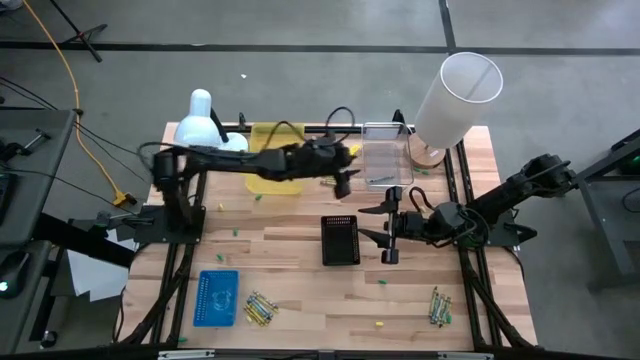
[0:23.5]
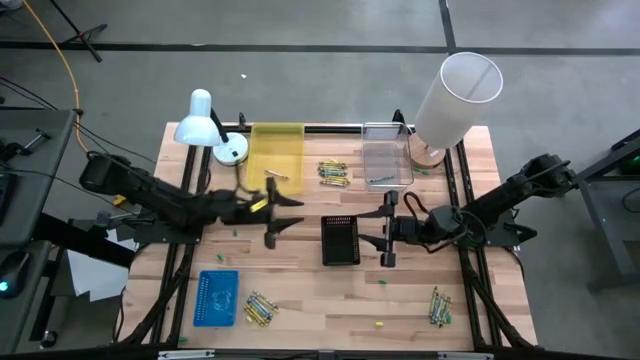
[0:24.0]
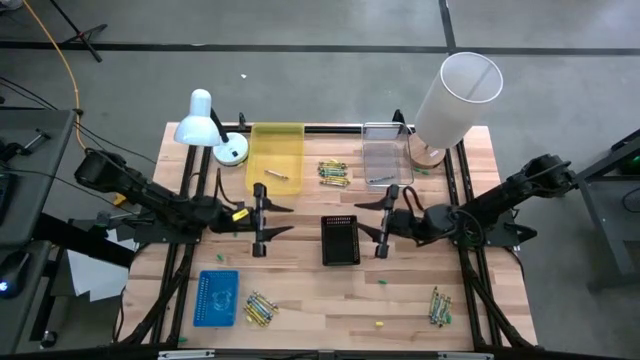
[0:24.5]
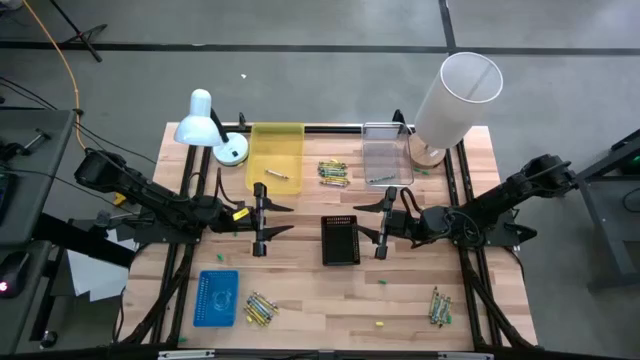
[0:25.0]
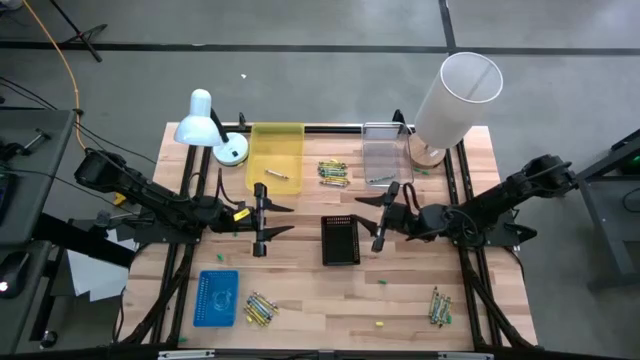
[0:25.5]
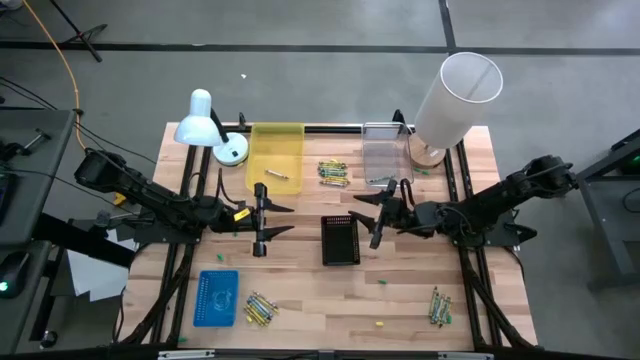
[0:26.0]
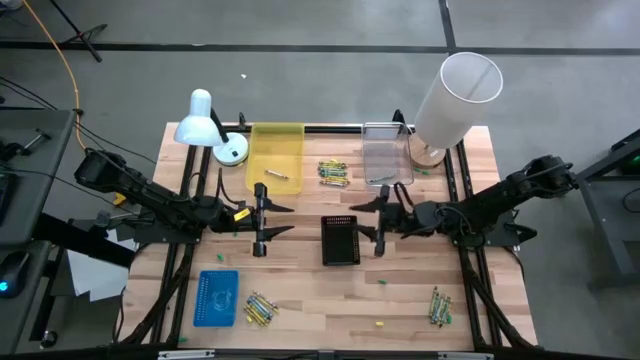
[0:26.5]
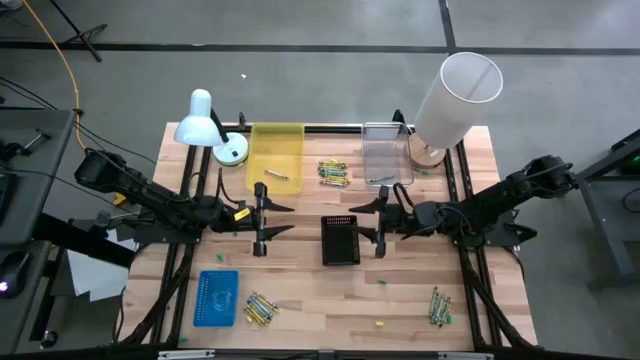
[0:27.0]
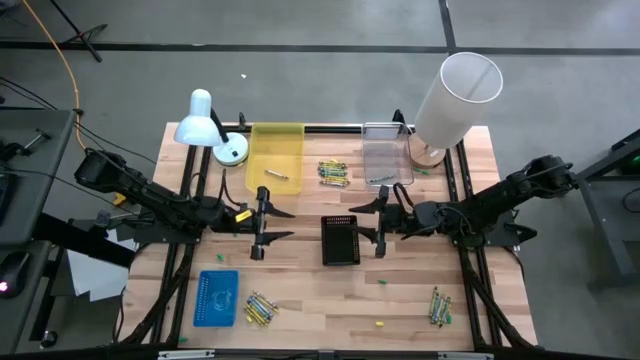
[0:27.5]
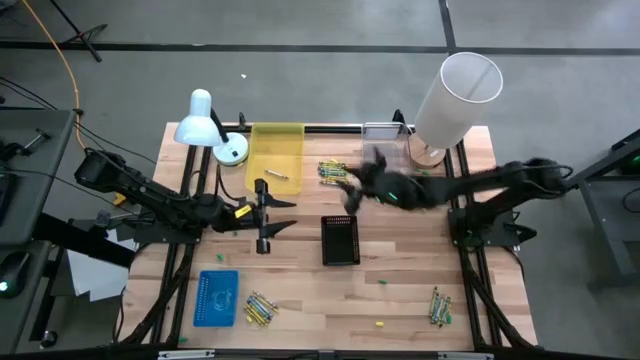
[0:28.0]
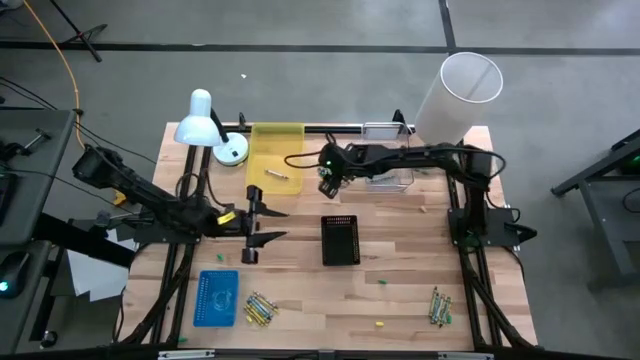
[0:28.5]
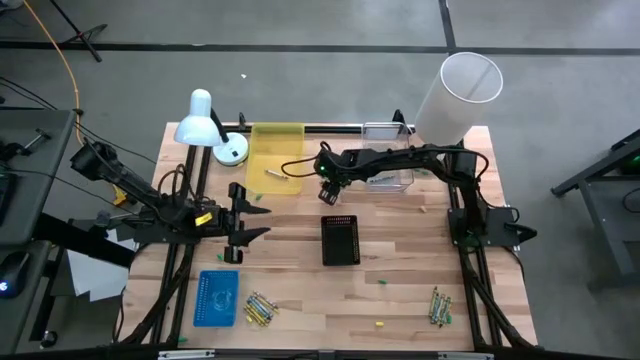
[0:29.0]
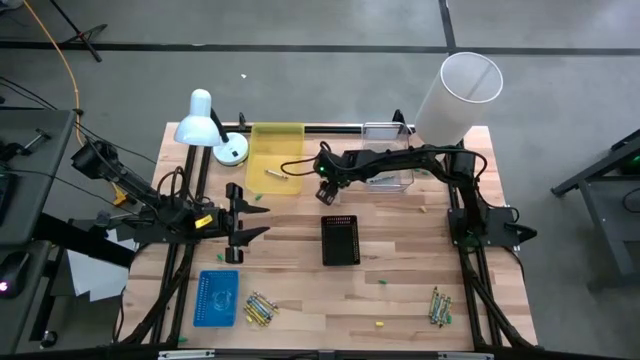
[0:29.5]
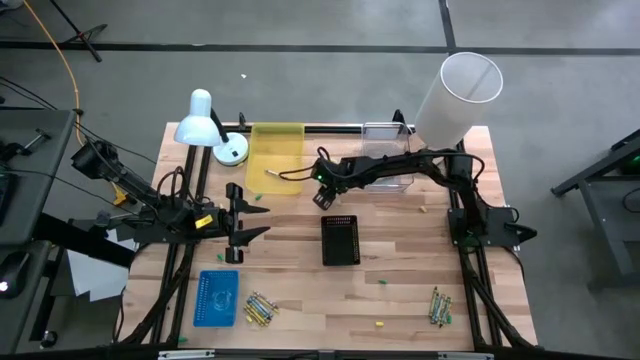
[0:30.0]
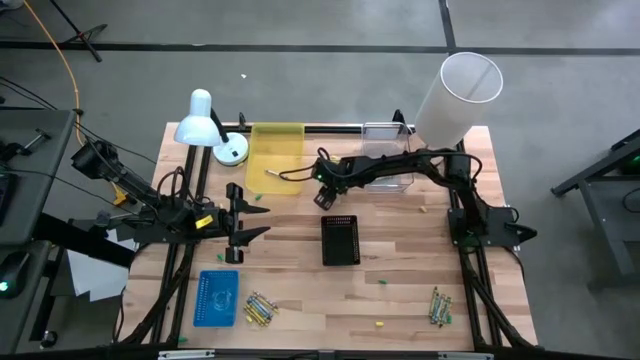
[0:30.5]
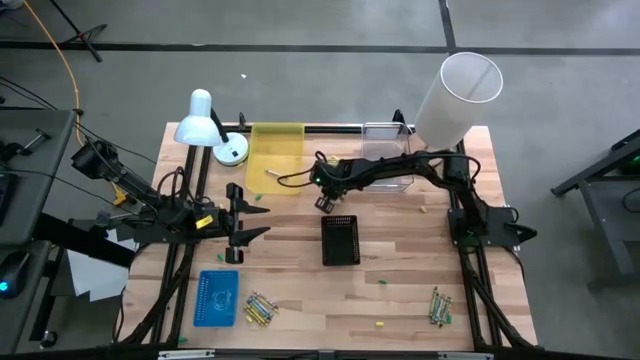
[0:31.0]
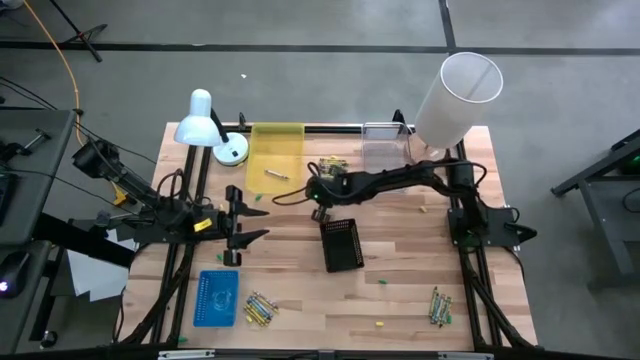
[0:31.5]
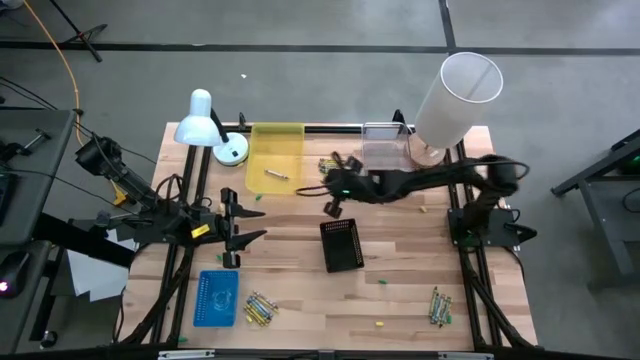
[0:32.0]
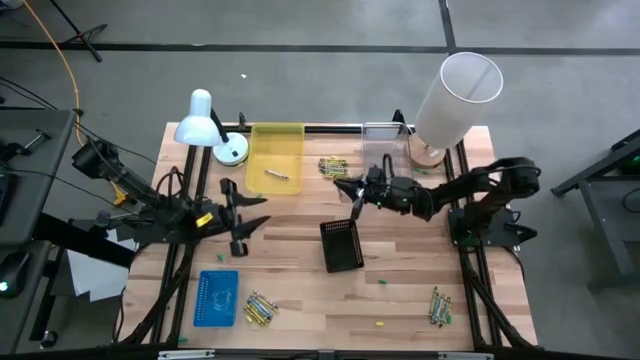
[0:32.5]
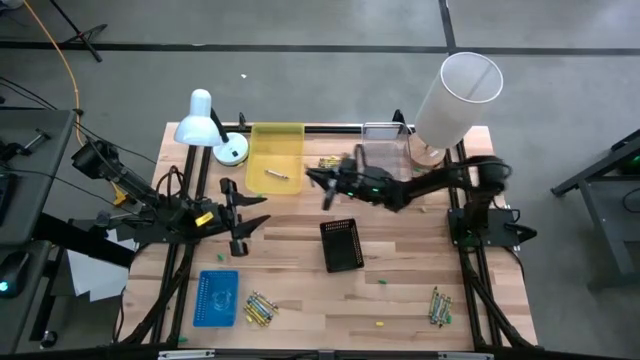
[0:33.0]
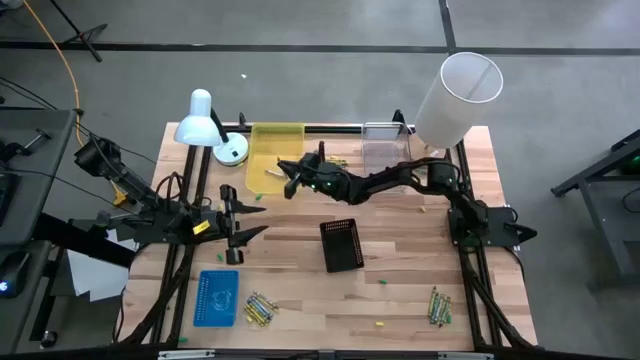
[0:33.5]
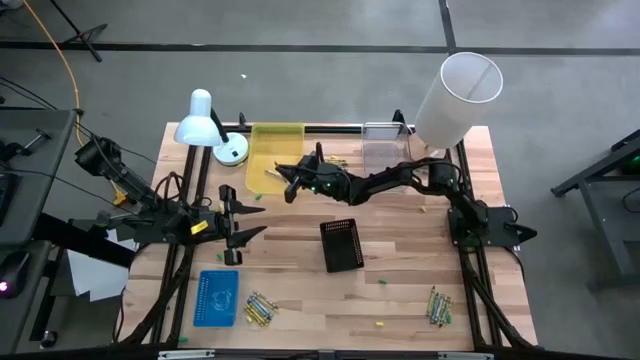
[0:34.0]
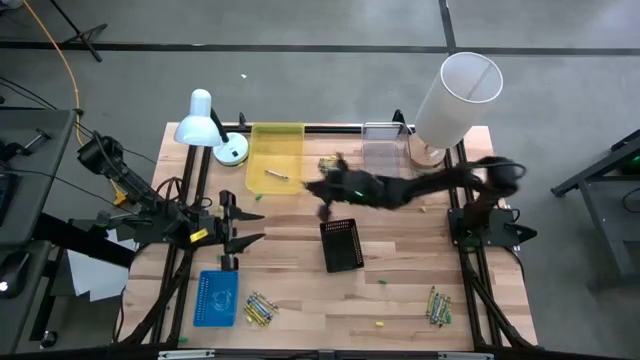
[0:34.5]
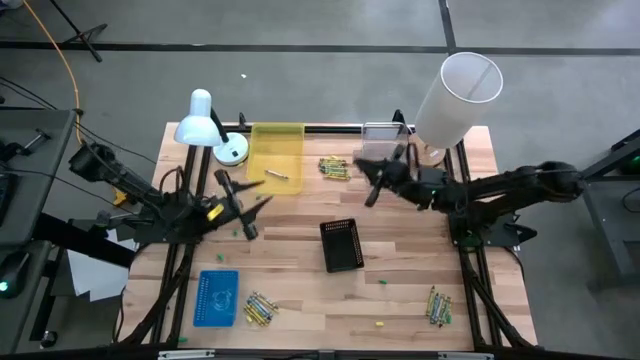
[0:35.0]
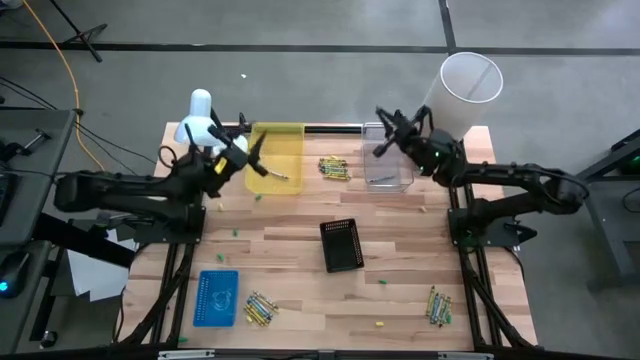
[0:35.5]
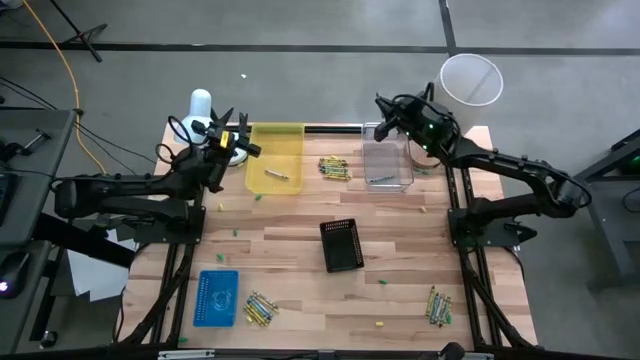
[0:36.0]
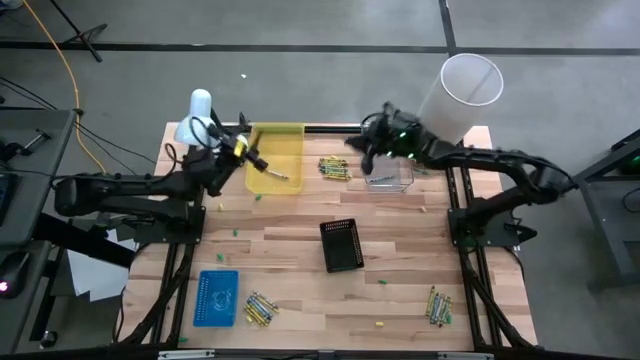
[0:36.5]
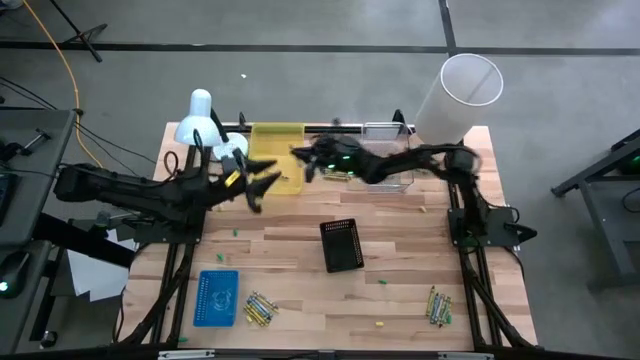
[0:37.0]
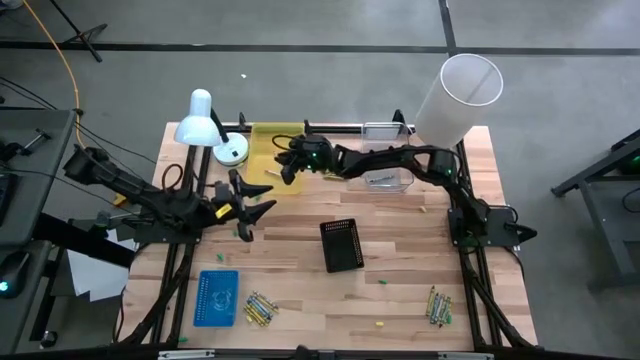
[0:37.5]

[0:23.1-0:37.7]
Task: Sort crayons
Put the gray crayon into the yellow transparent bin

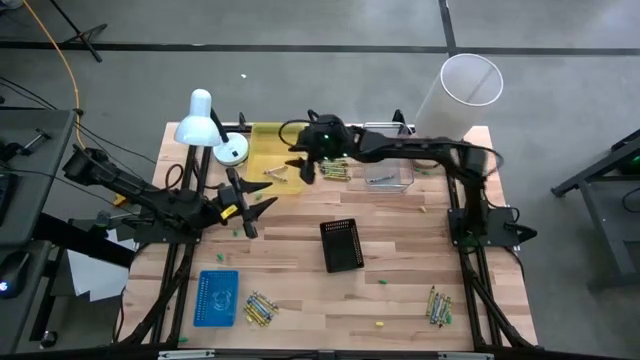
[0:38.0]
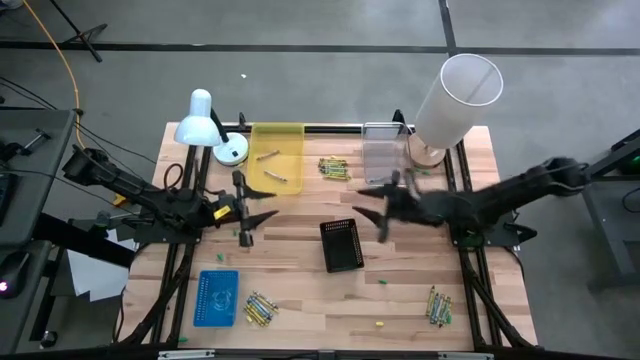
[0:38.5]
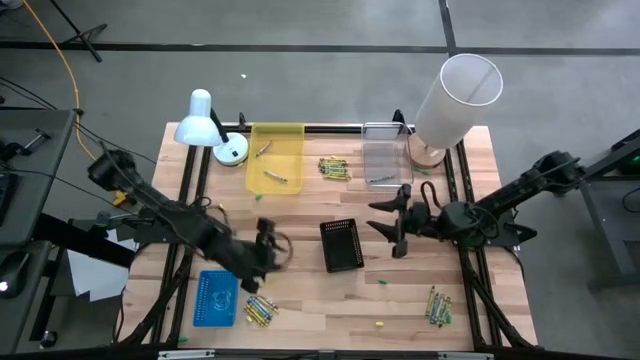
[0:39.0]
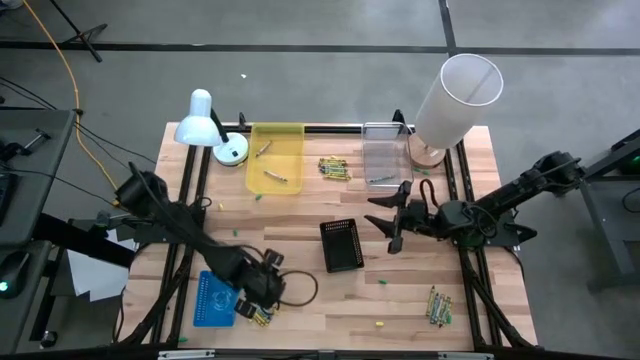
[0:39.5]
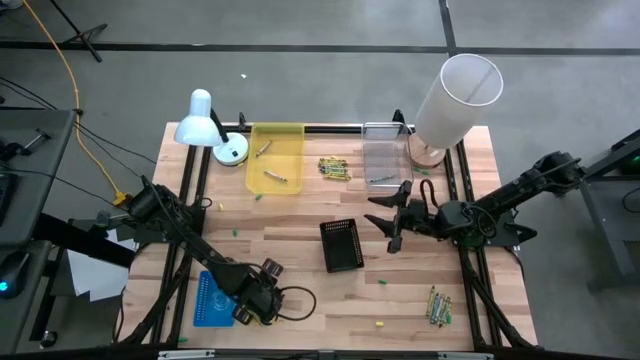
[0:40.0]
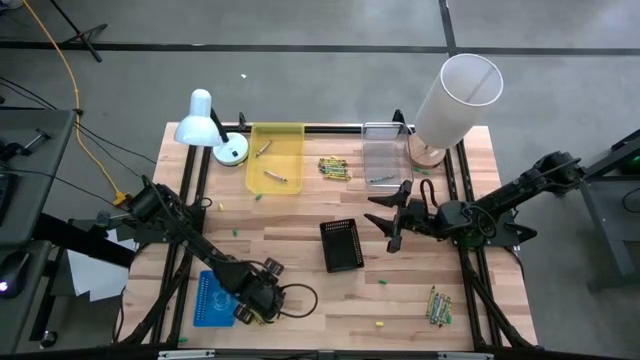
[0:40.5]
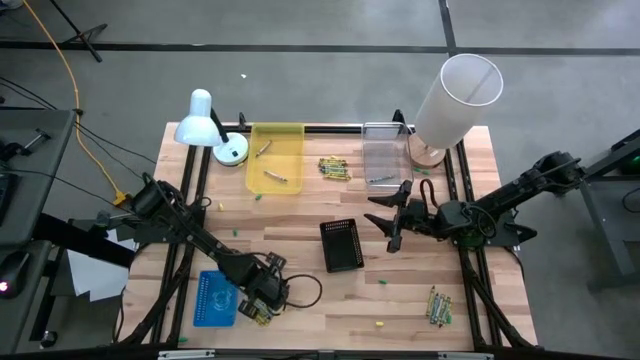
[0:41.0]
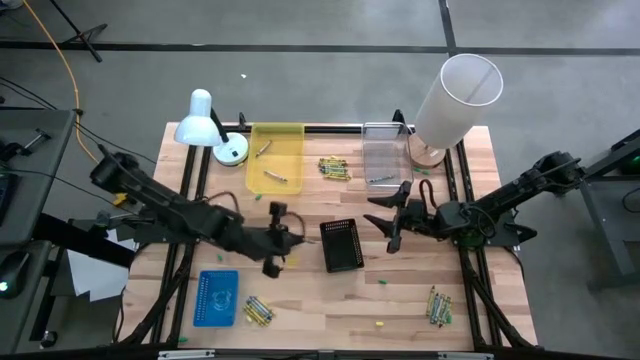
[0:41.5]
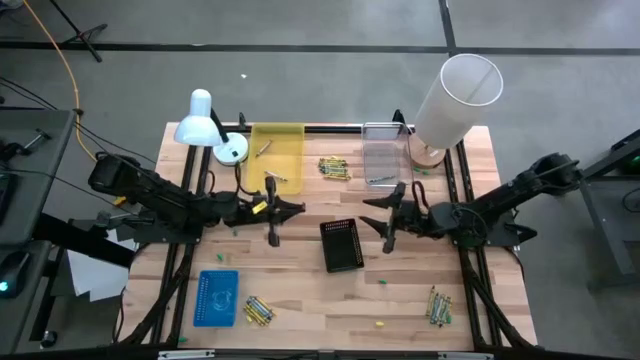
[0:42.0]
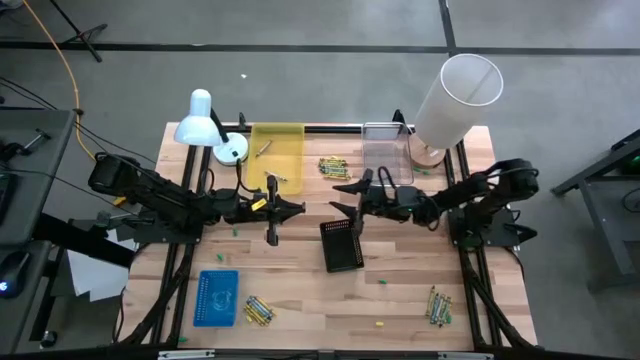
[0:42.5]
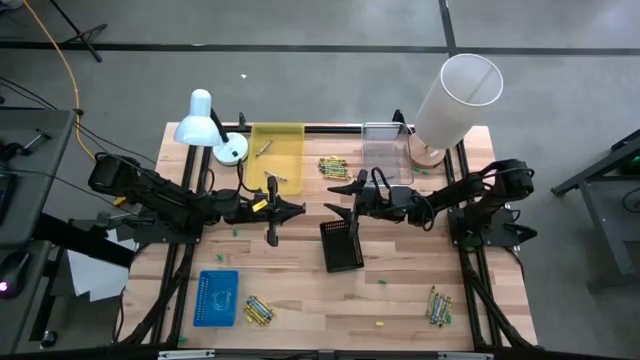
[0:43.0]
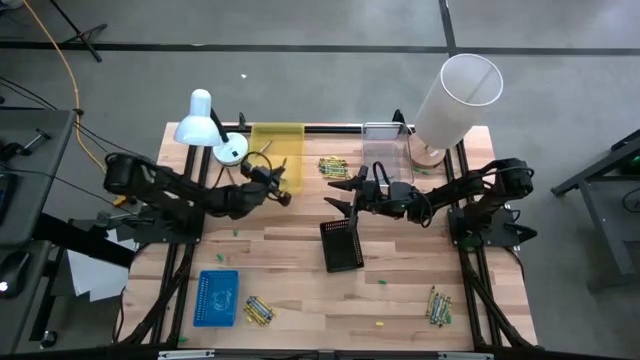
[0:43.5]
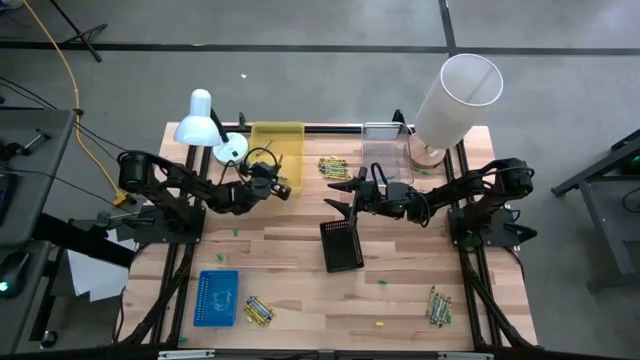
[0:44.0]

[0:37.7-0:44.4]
Put the gray crayon into the yellow transparent bin

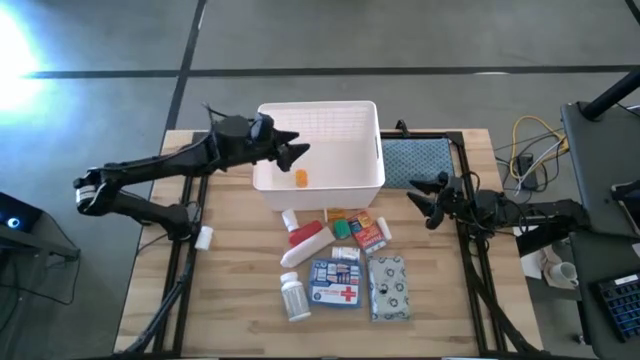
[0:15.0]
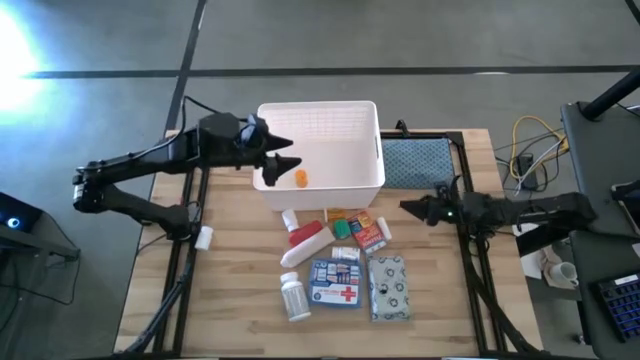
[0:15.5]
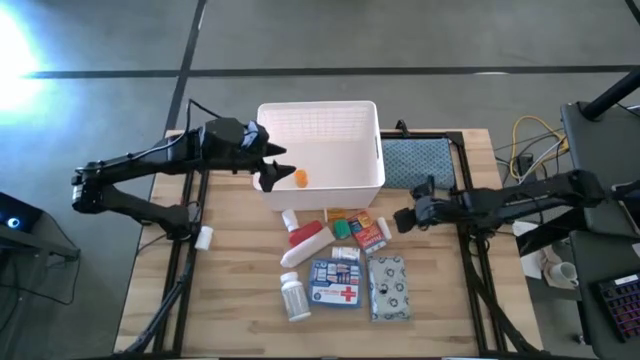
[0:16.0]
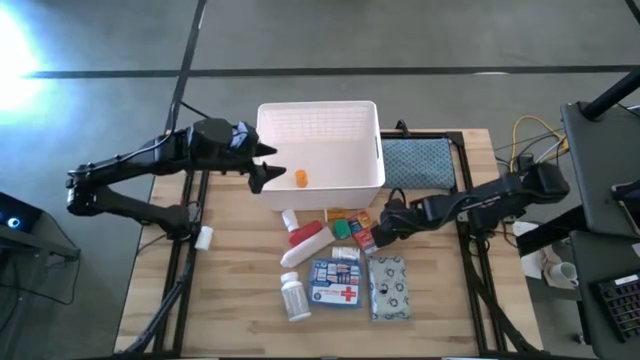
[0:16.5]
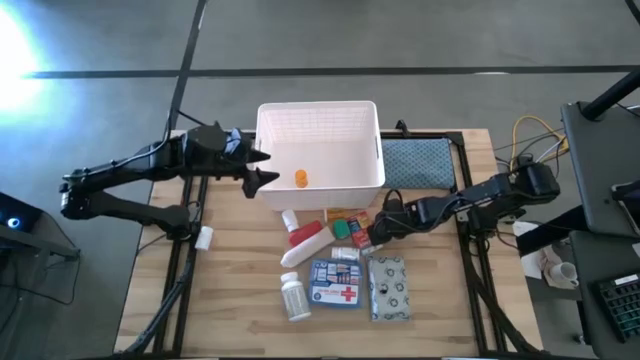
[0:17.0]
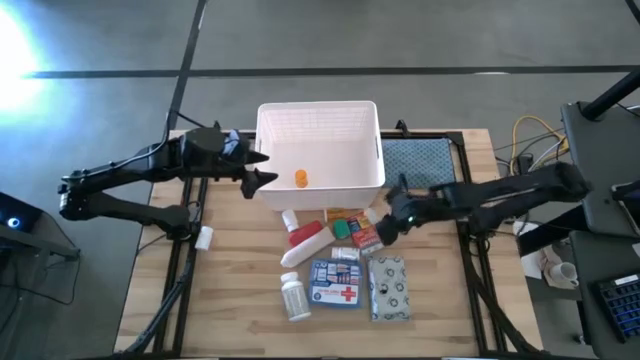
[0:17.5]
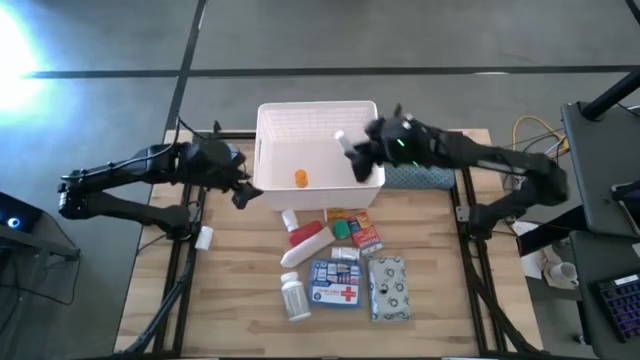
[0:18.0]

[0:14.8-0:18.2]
Task: Pick & place medical supplies in basket/bin
Put the white rolled gauze into the white container
